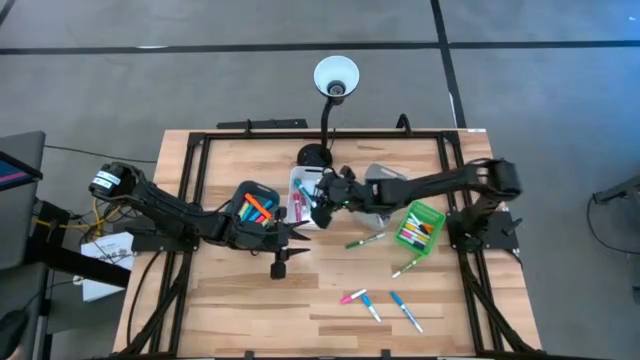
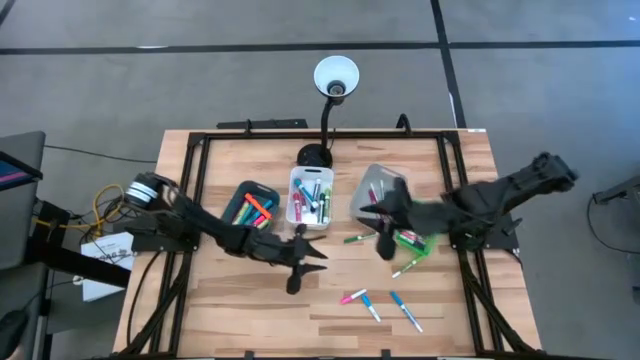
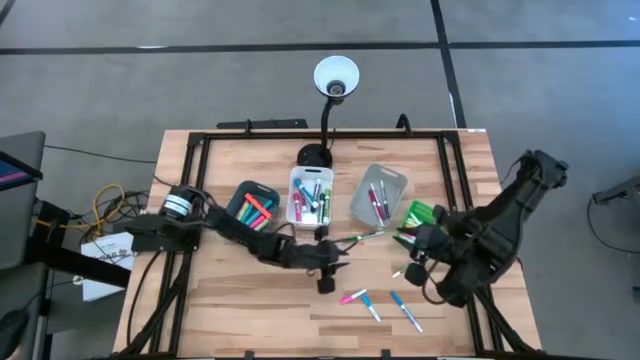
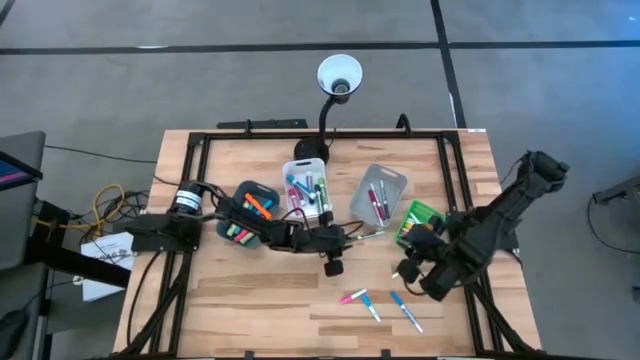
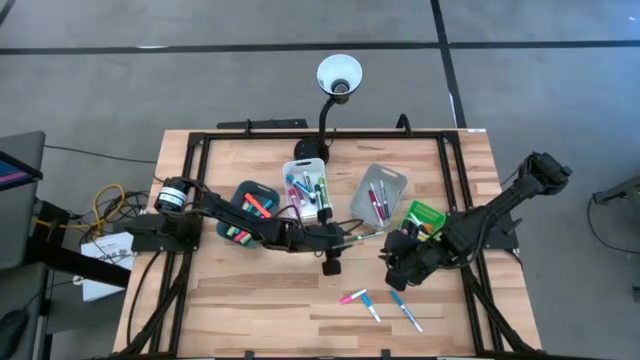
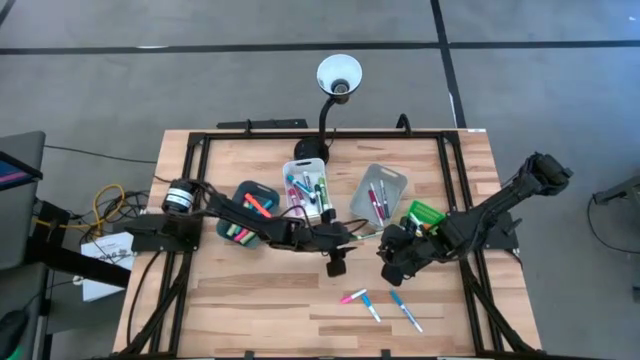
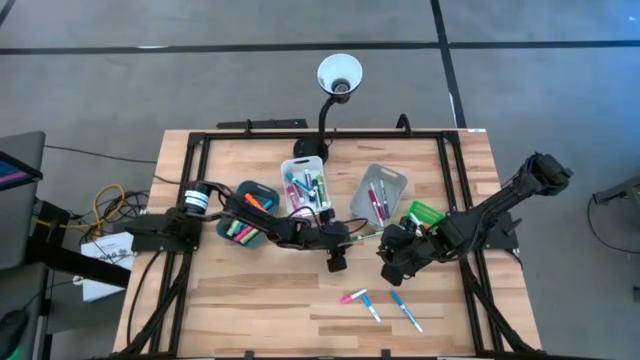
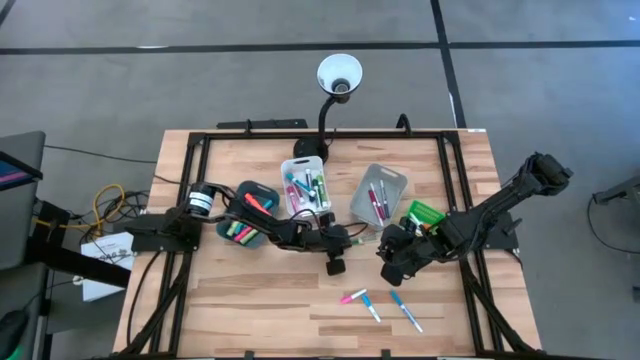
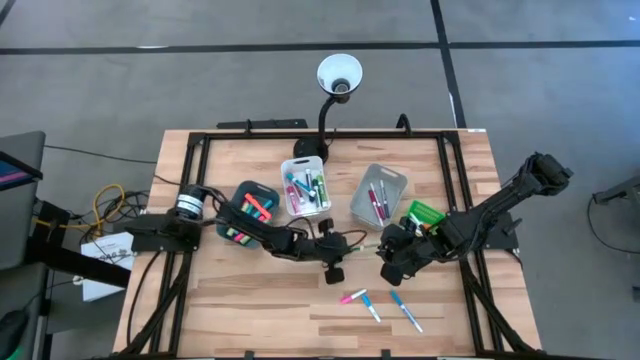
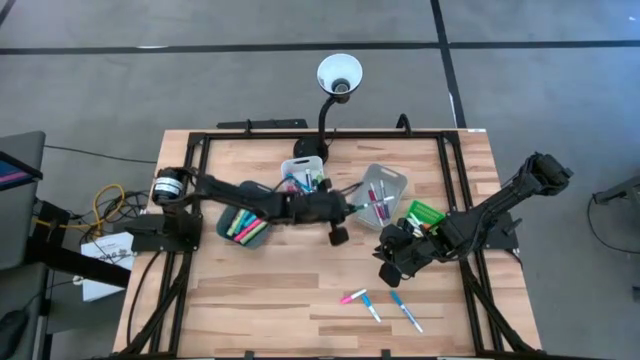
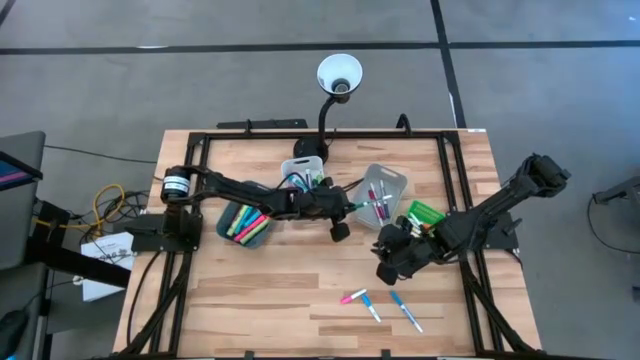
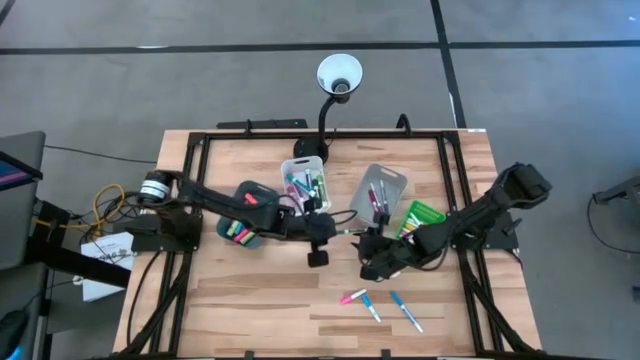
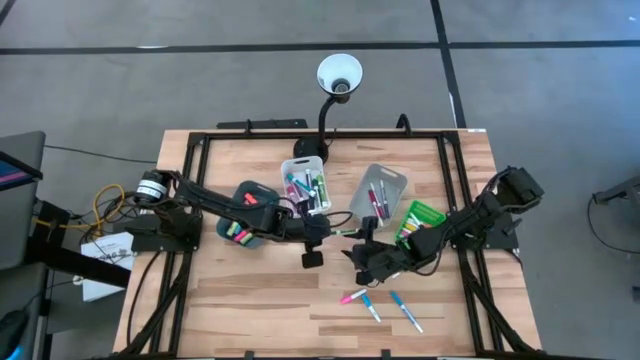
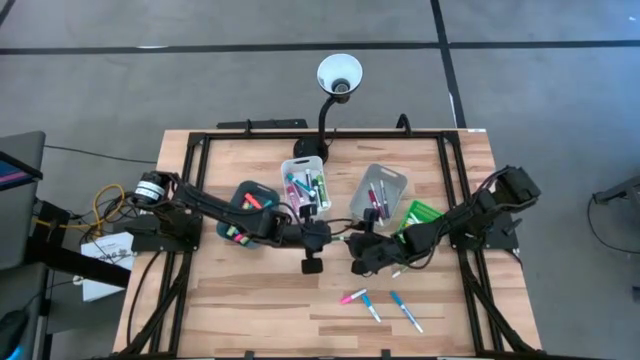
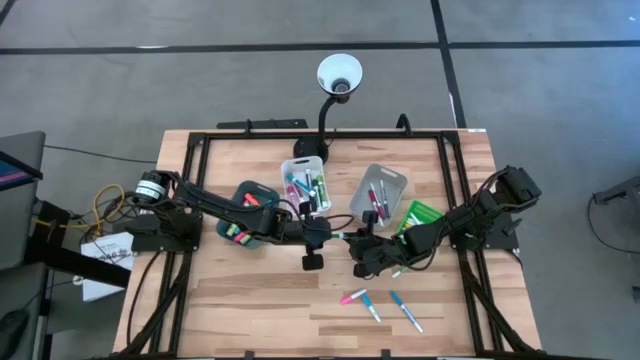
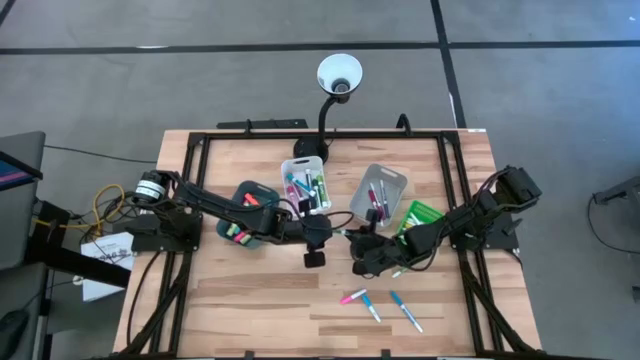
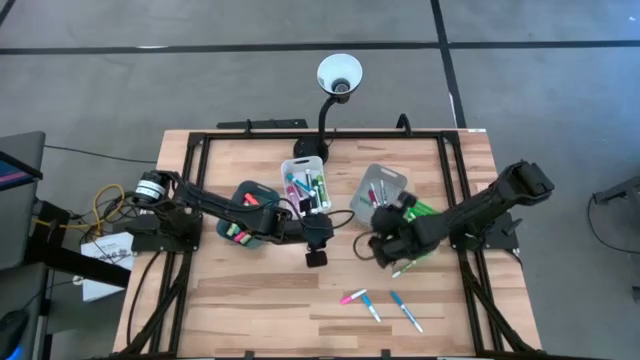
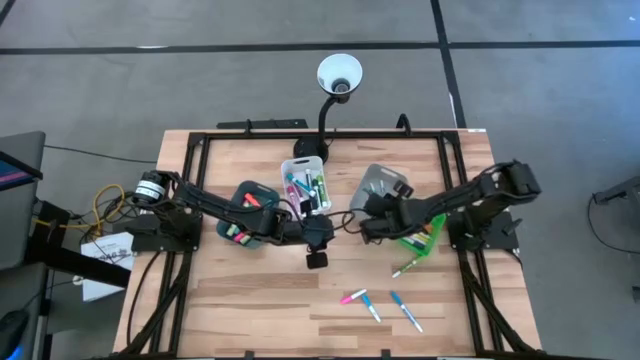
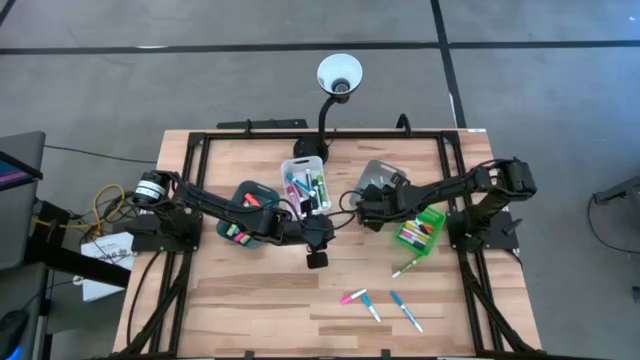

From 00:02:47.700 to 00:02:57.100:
Task: Pick & Place Markers
Put the green mini dry erase marker into the gray bin

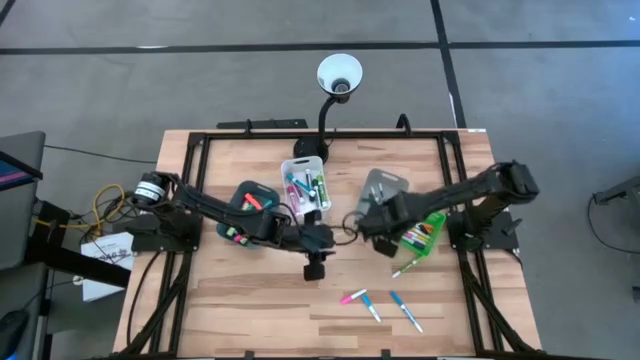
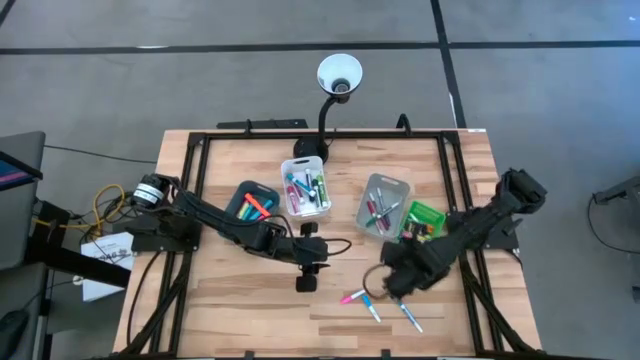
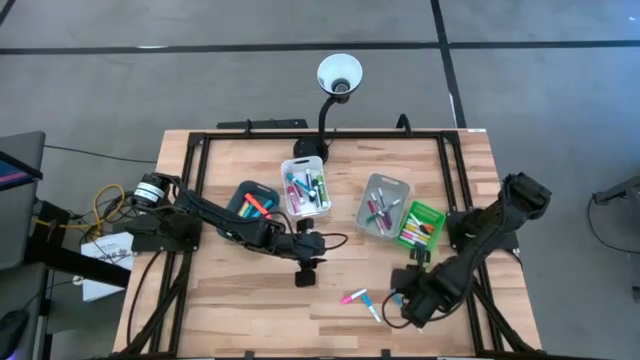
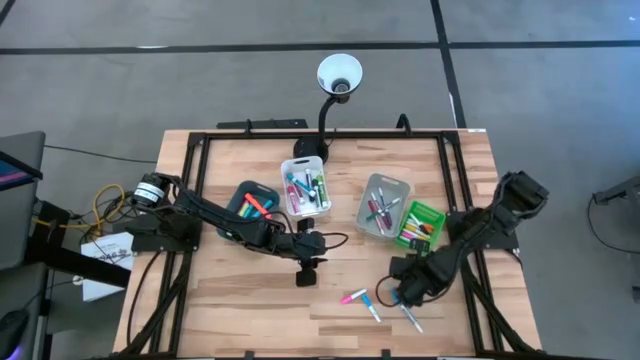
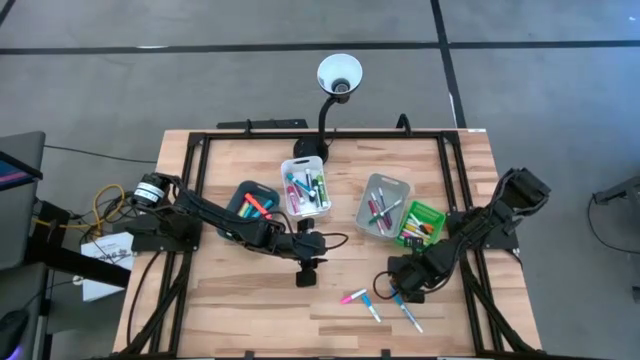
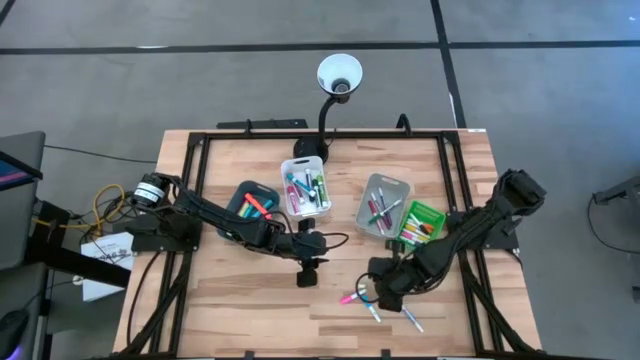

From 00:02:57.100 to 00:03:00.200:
Put the light green mini dry erase marker into the gray bin

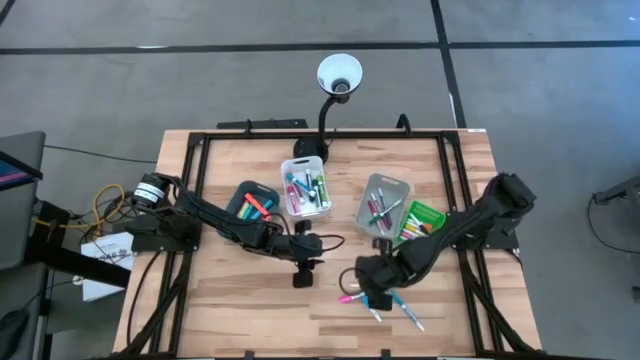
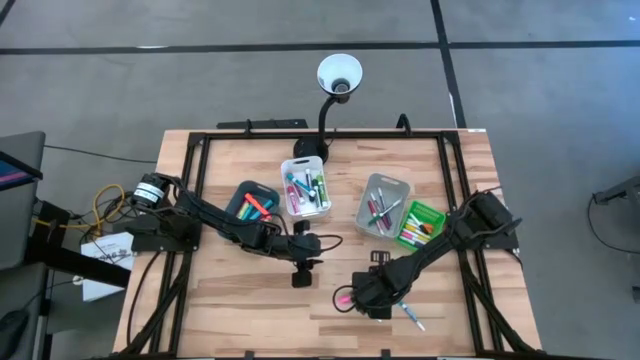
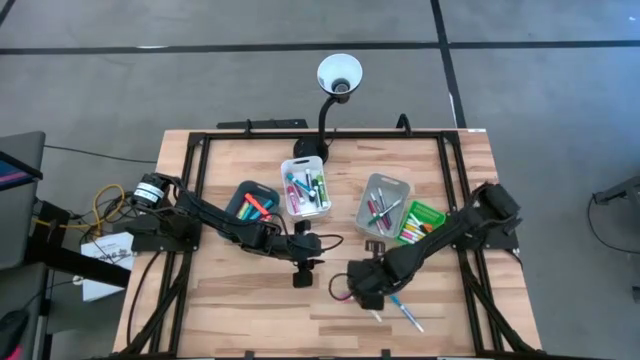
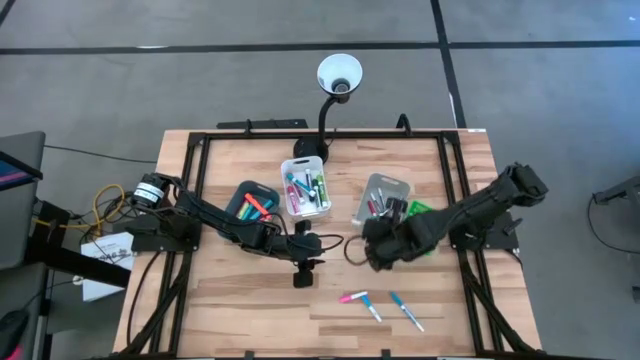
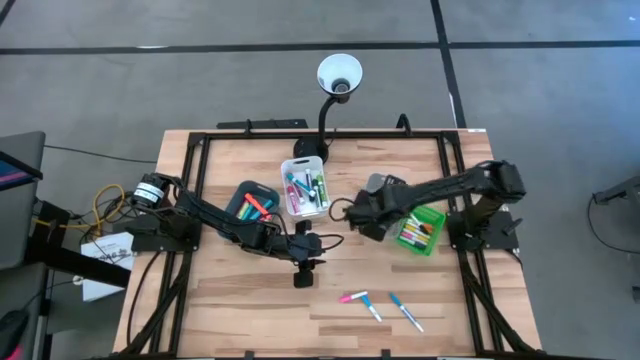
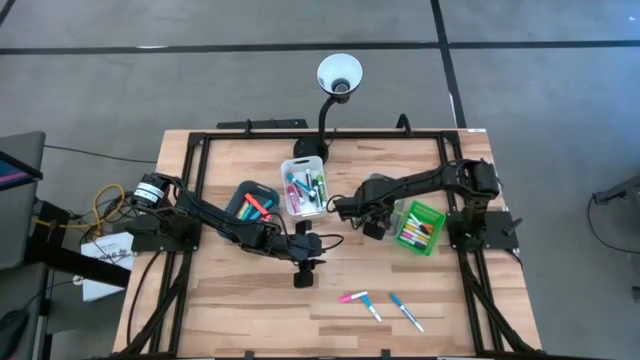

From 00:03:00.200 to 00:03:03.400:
Put the light green mini dry erase marker into the gray bin

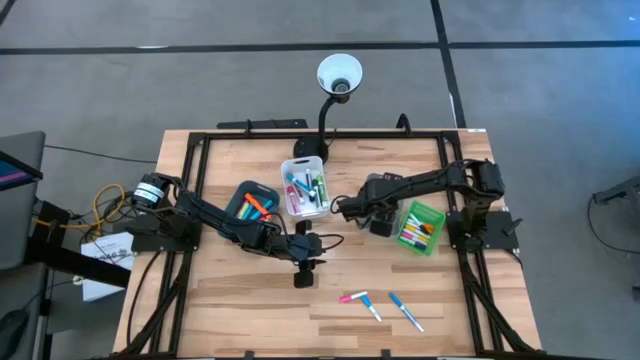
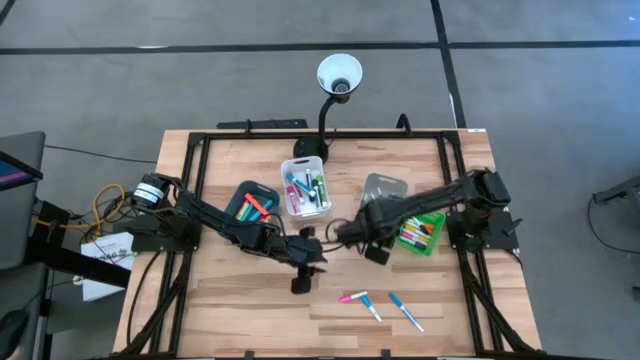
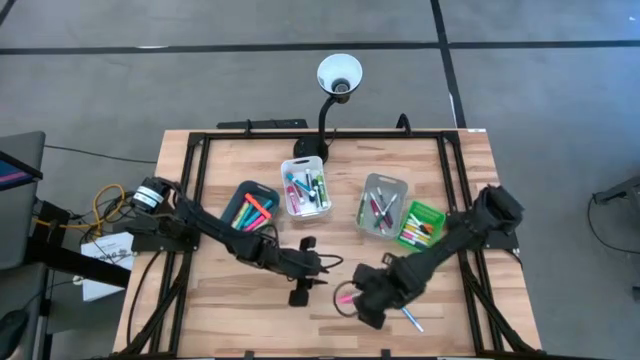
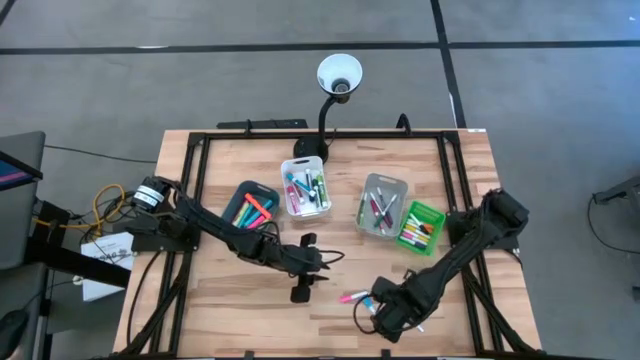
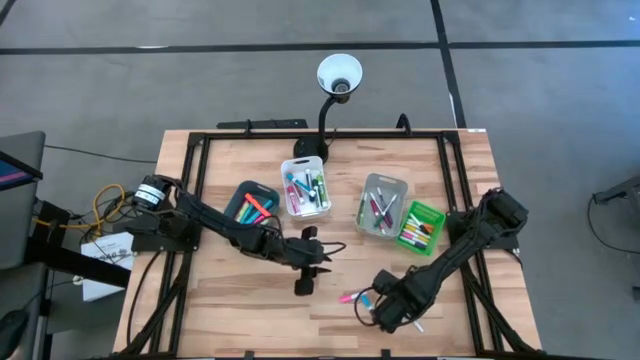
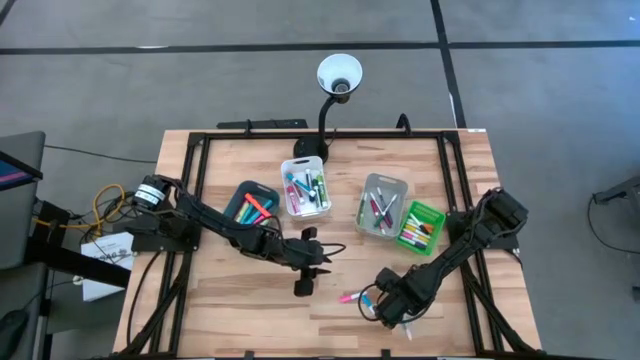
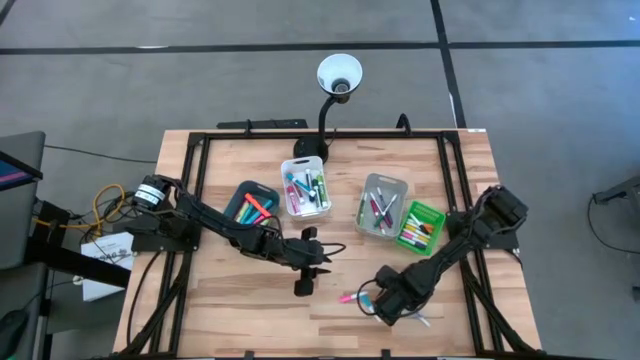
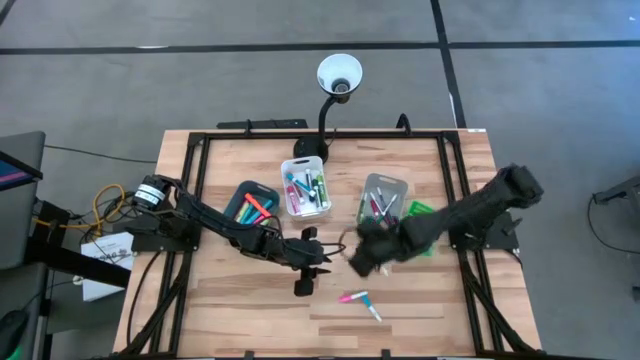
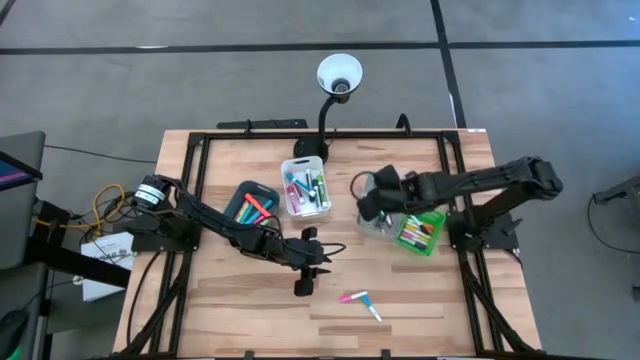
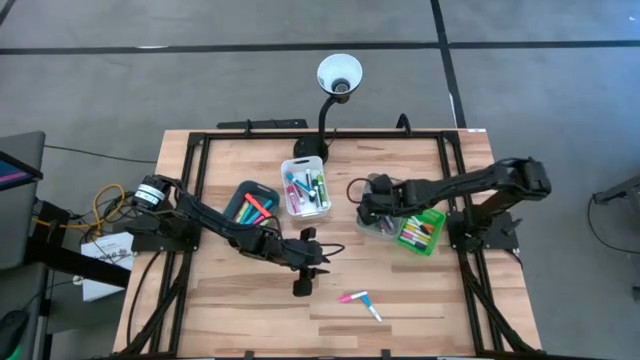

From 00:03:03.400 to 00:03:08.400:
Put the light blue mini dry erase marker into the gray bin
